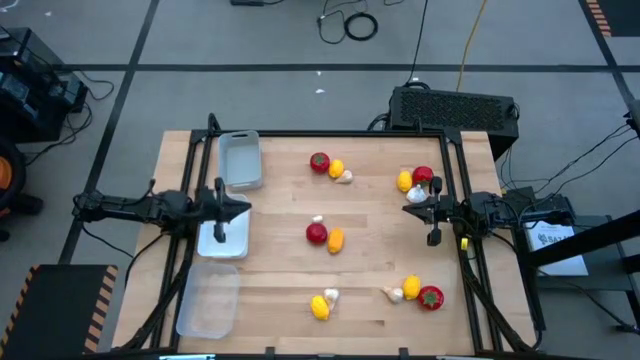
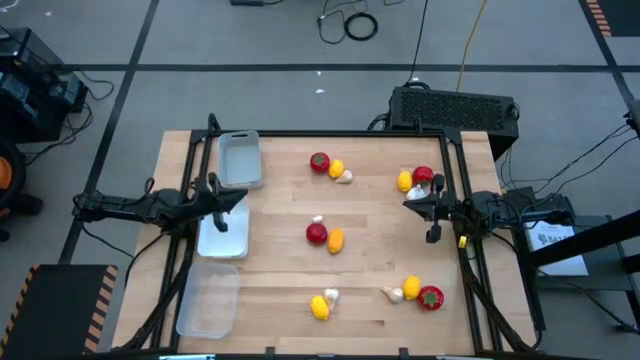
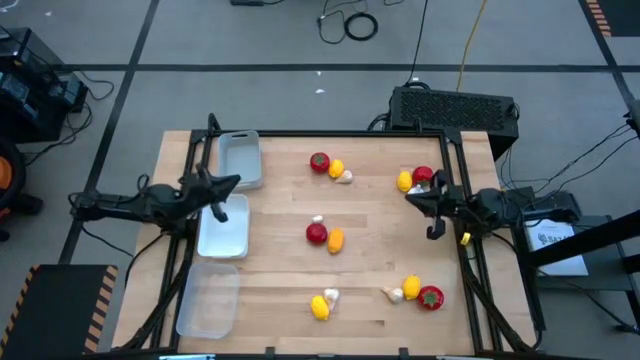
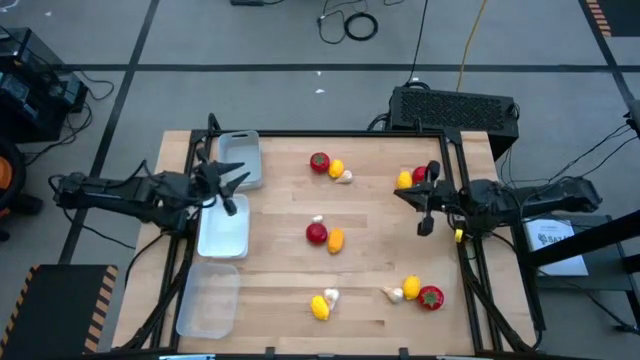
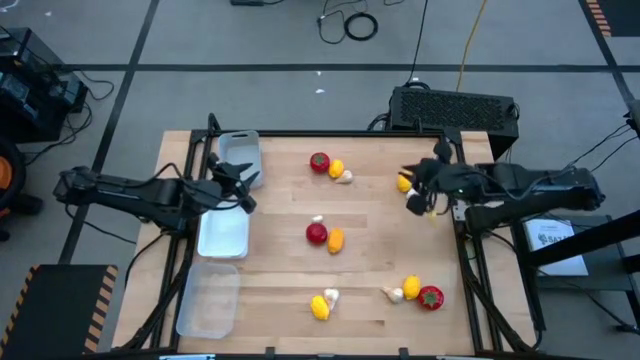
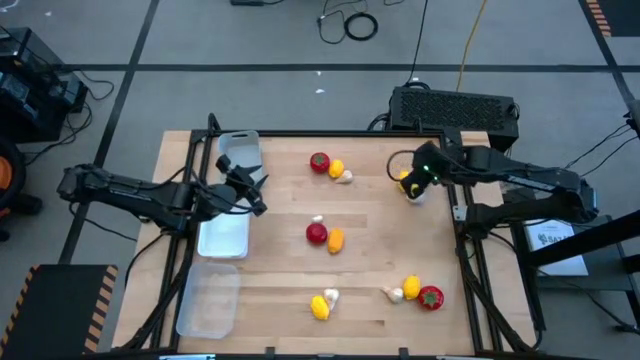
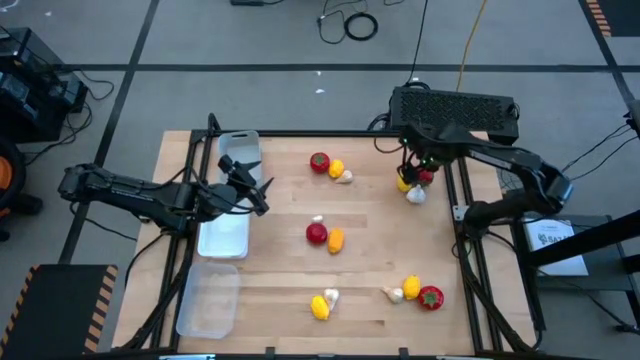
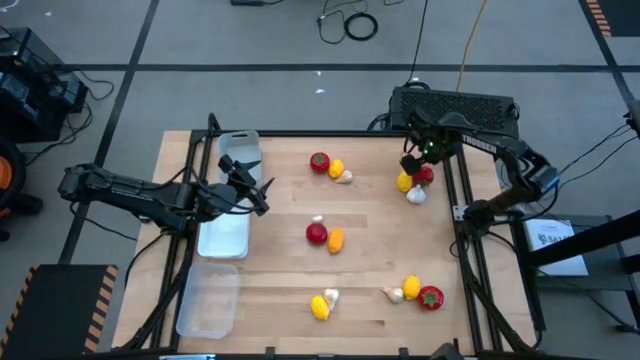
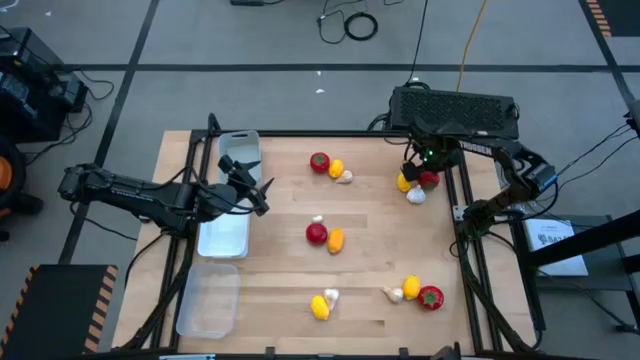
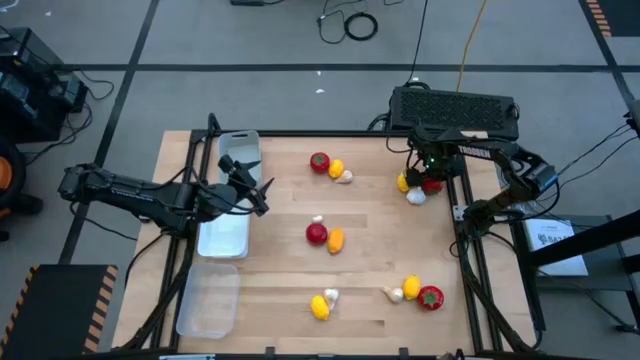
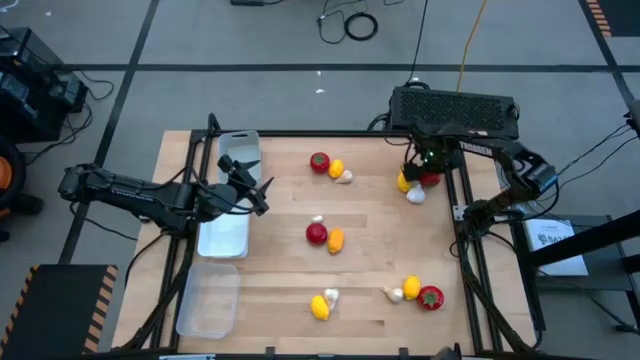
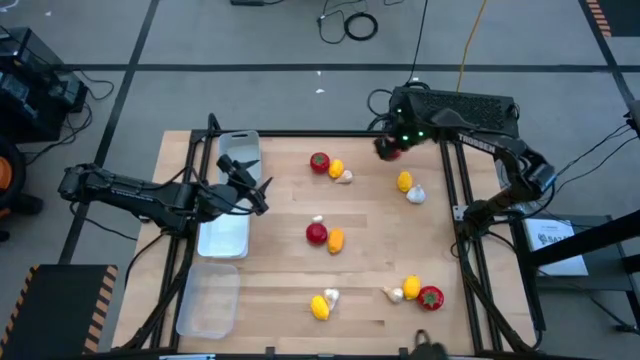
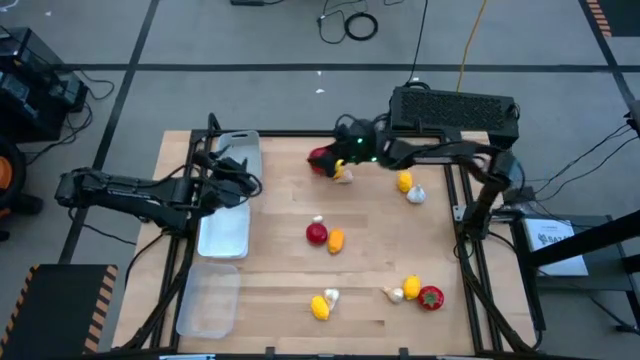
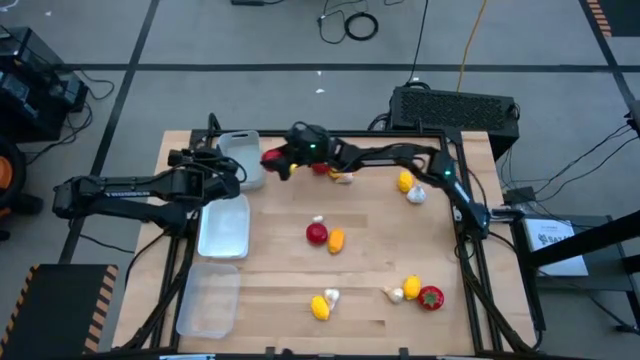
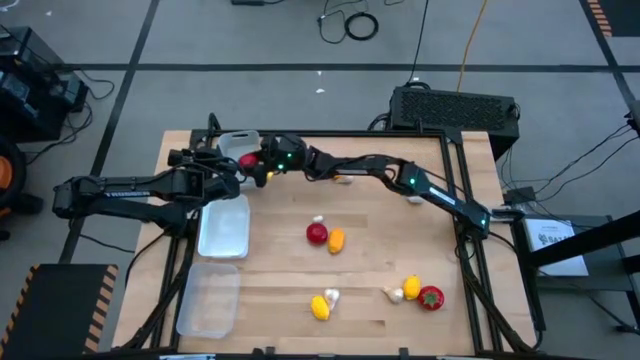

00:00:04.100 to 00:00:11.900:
Task: Sort produce into baskets
Put the tomato into the gray bin

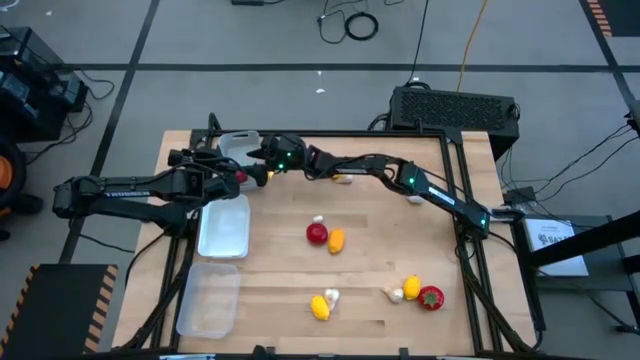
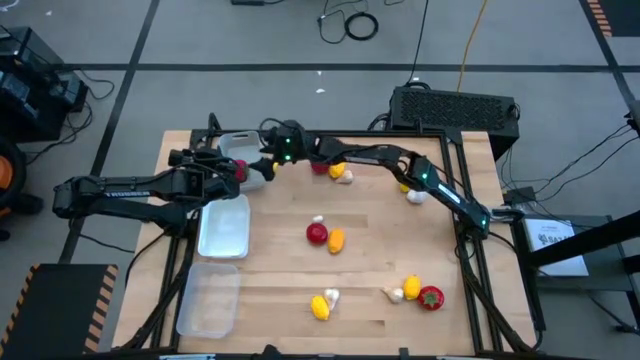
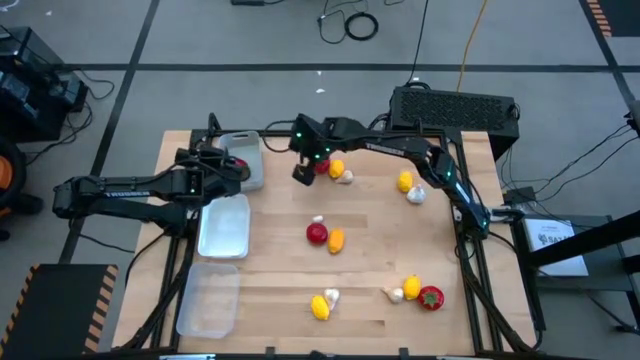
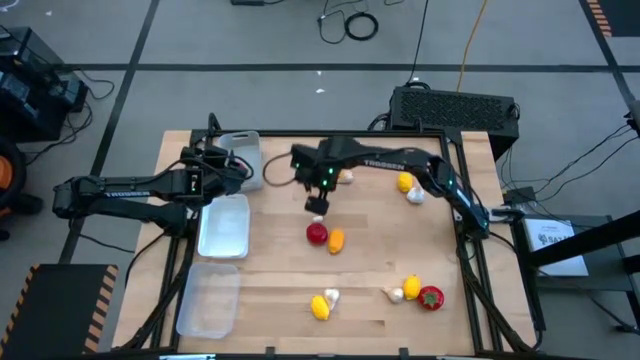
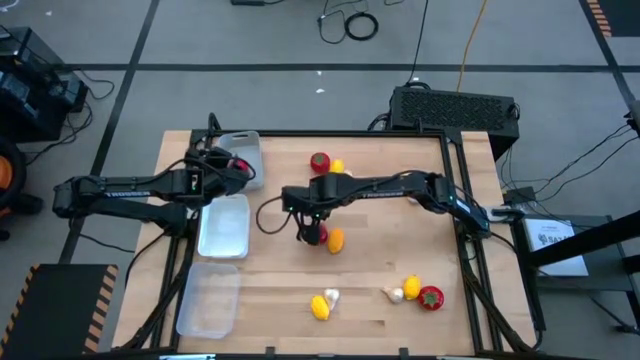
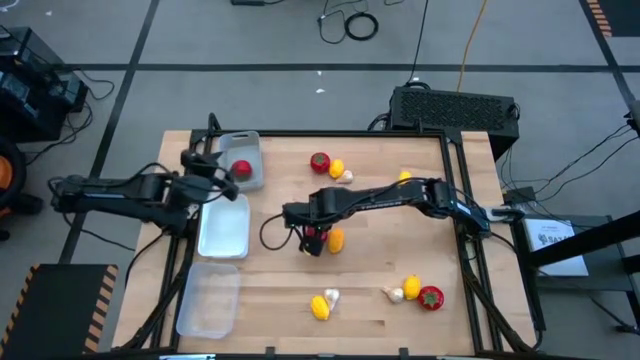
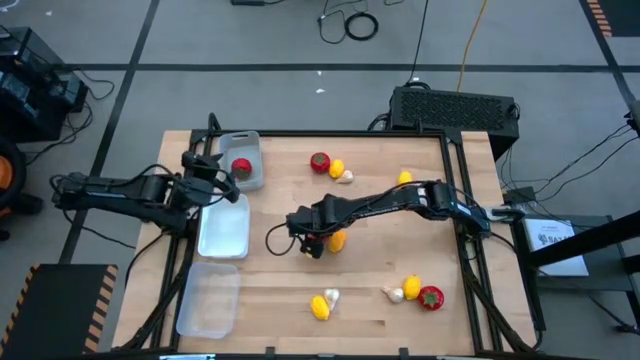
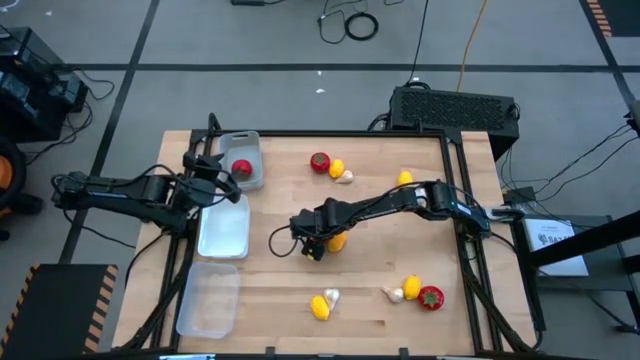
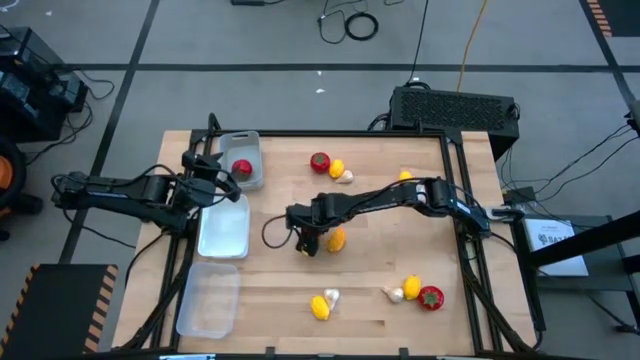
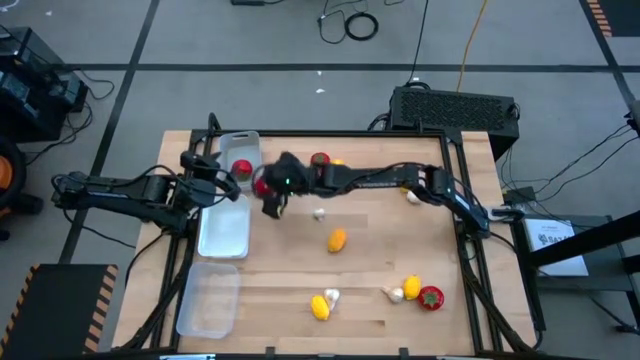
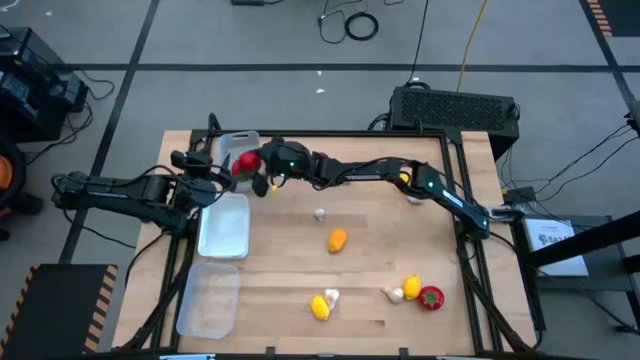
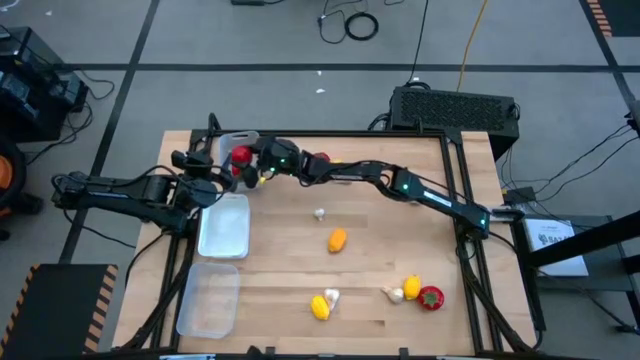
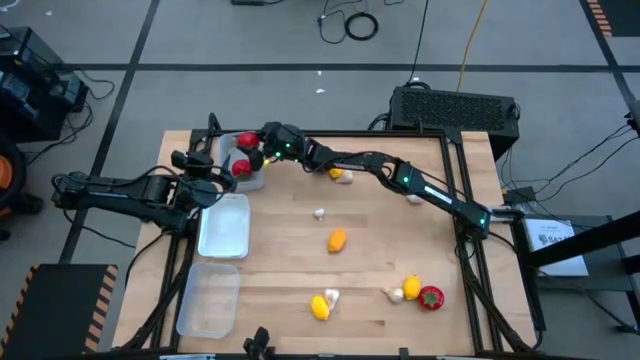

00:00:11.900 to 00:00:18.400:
Put the tomato into the gray bin

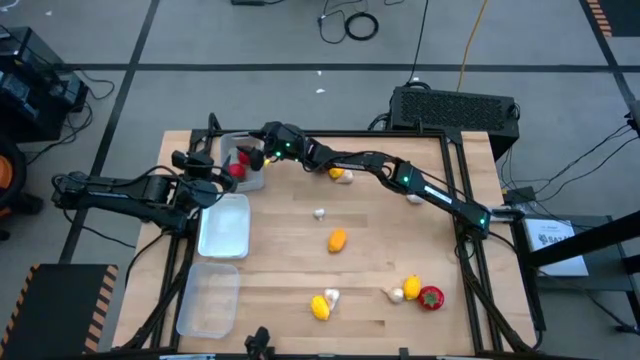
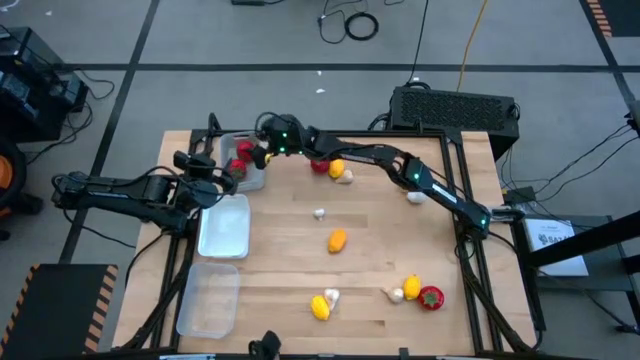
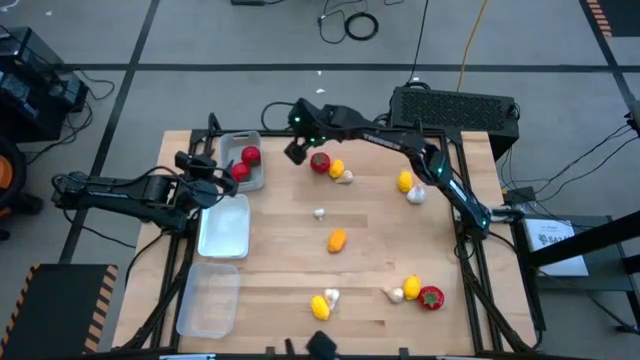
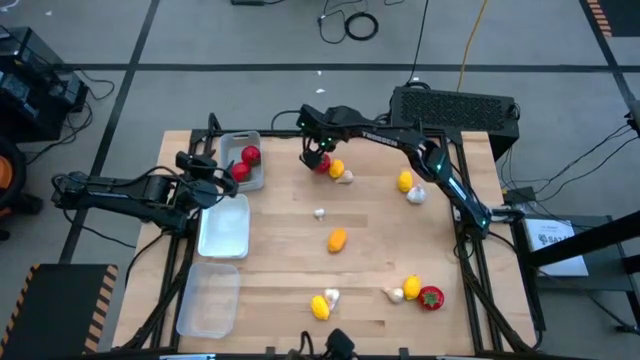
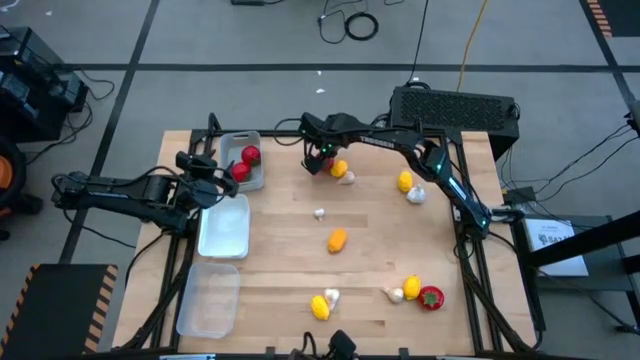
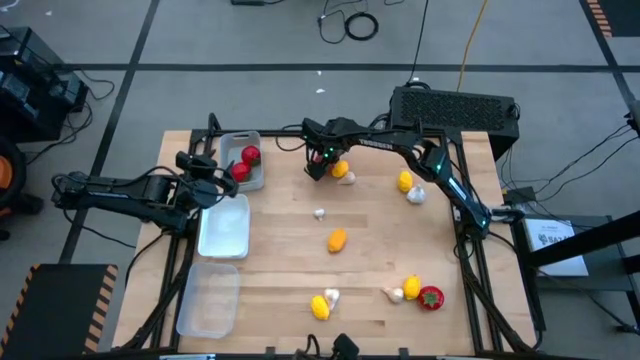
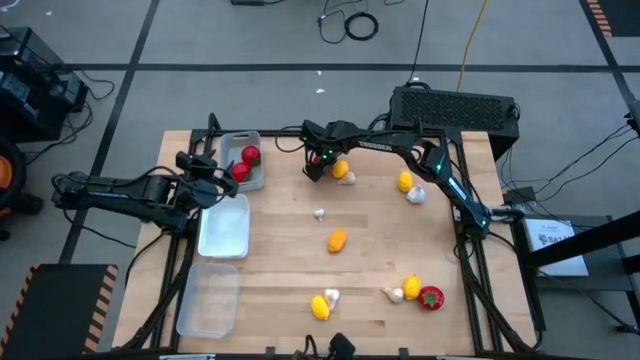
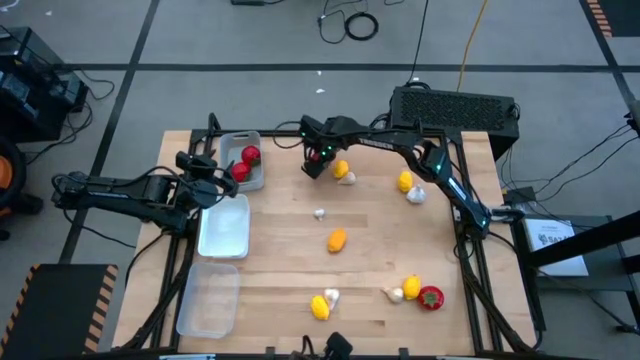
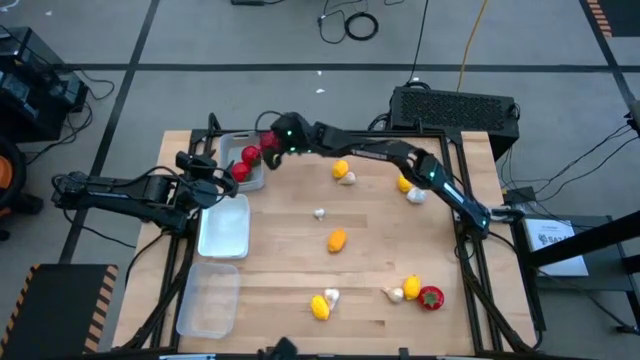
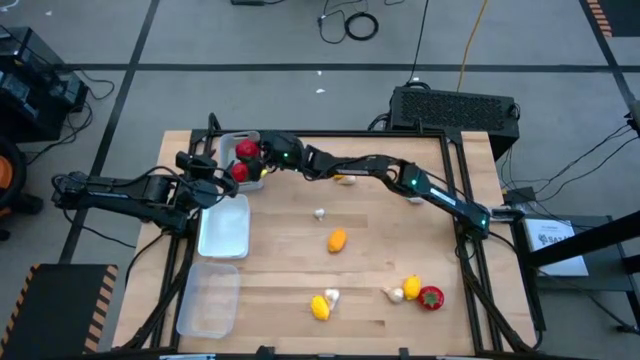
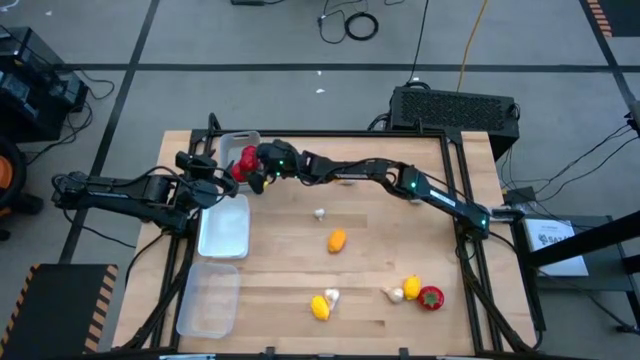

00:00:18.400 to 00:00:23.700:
Put the tomato into the gray bin
